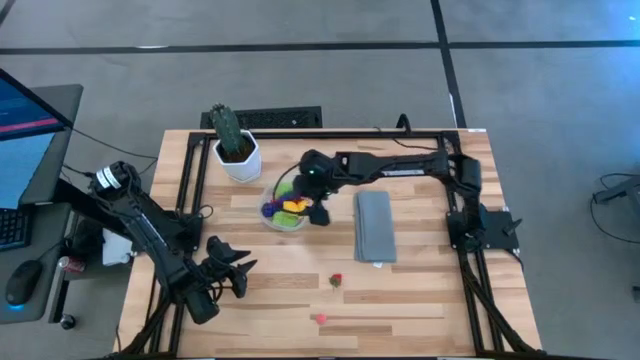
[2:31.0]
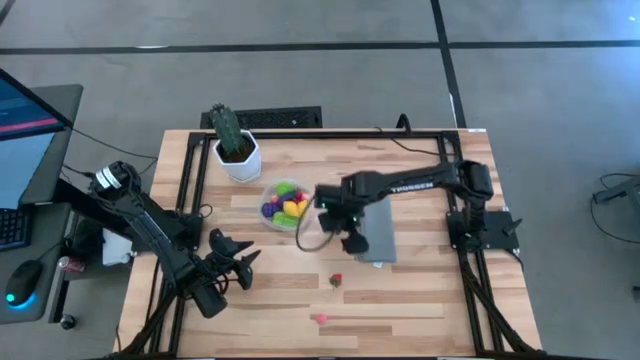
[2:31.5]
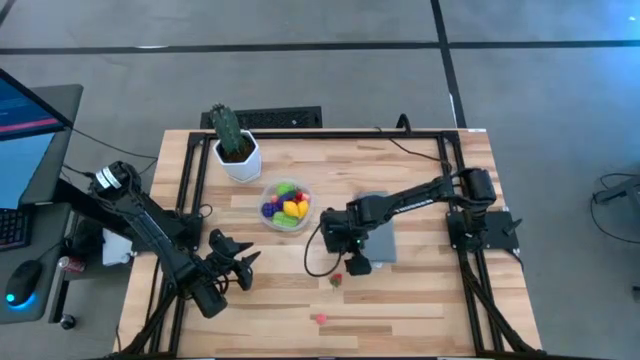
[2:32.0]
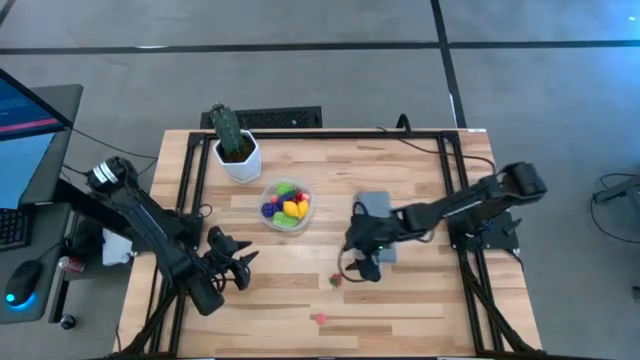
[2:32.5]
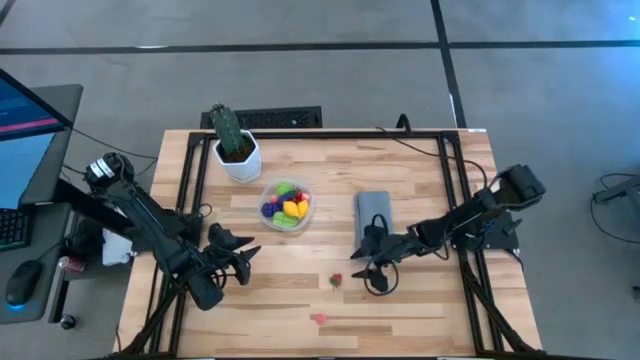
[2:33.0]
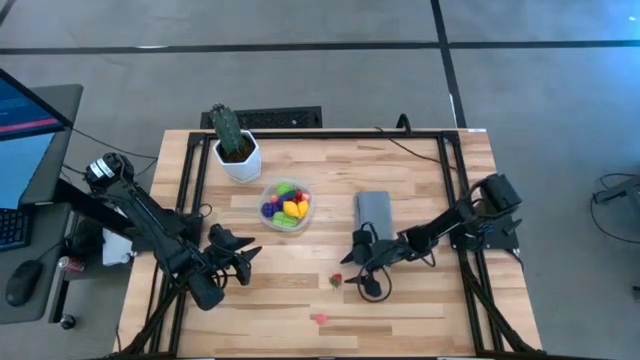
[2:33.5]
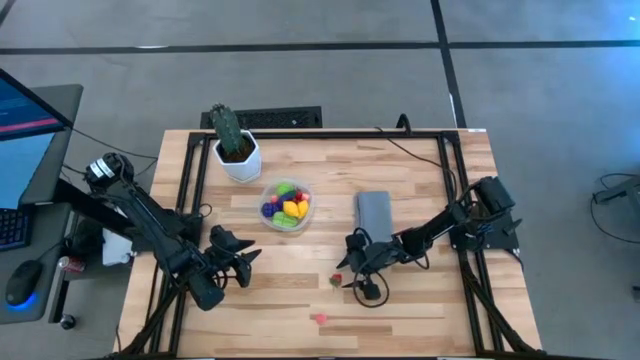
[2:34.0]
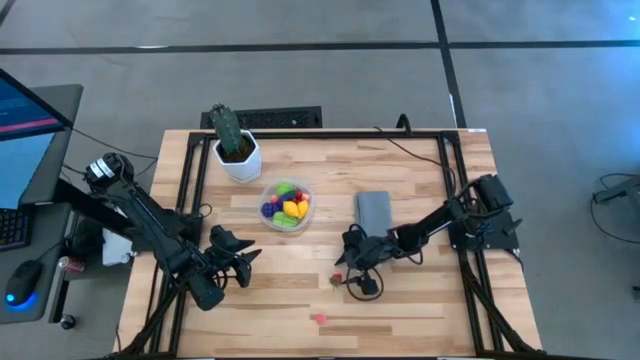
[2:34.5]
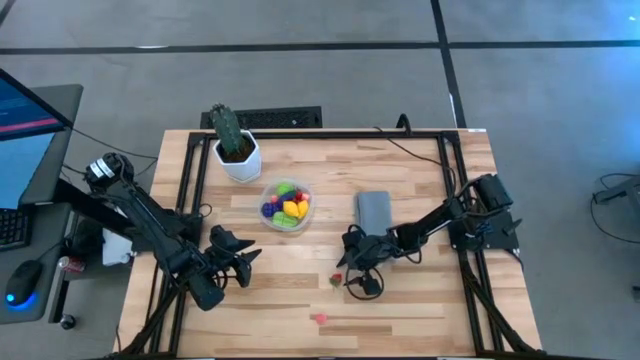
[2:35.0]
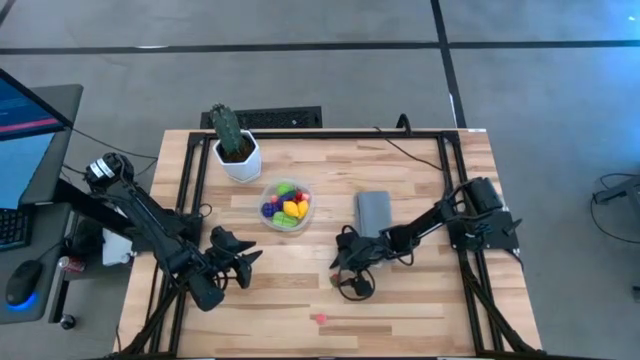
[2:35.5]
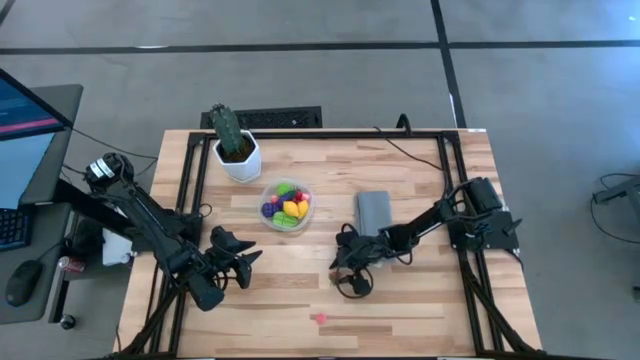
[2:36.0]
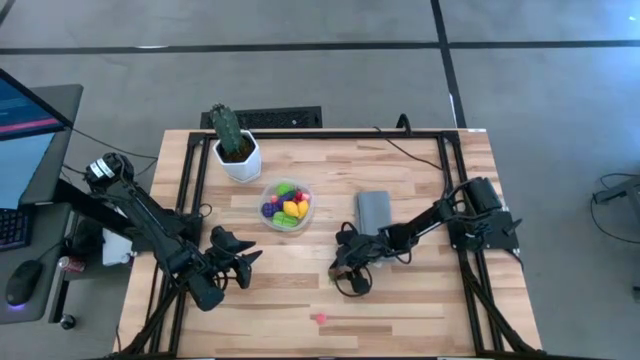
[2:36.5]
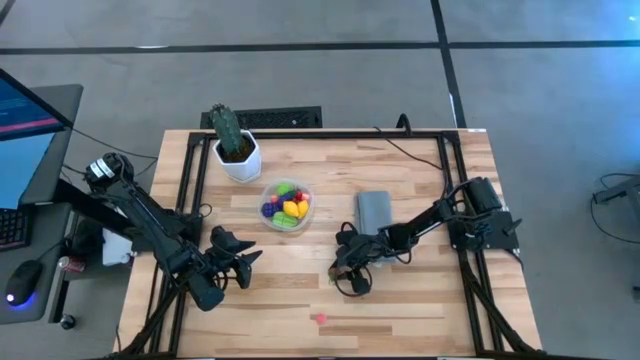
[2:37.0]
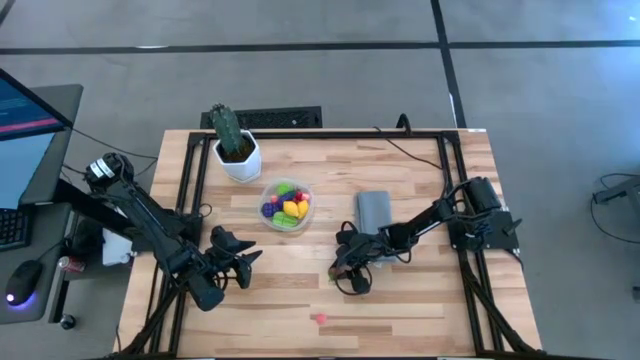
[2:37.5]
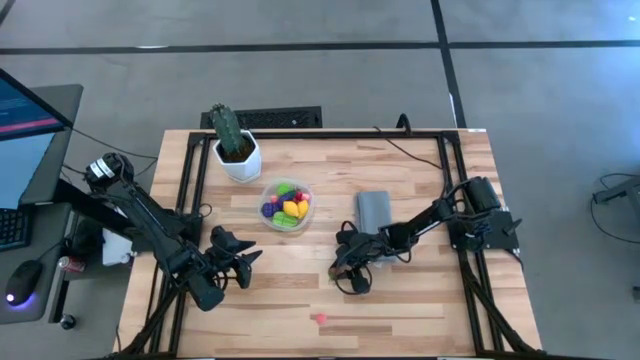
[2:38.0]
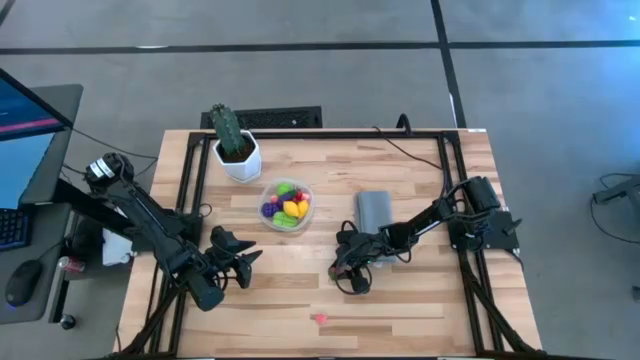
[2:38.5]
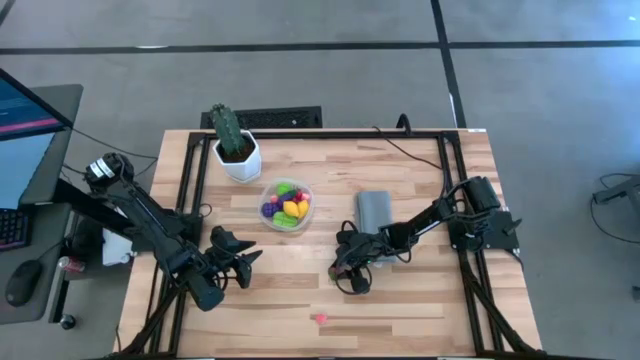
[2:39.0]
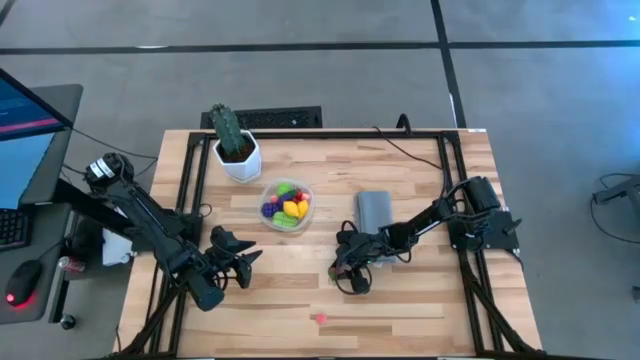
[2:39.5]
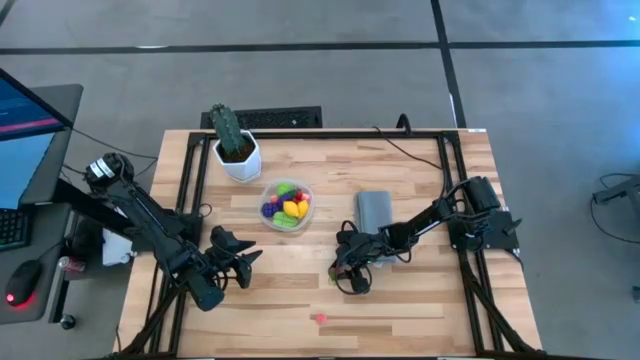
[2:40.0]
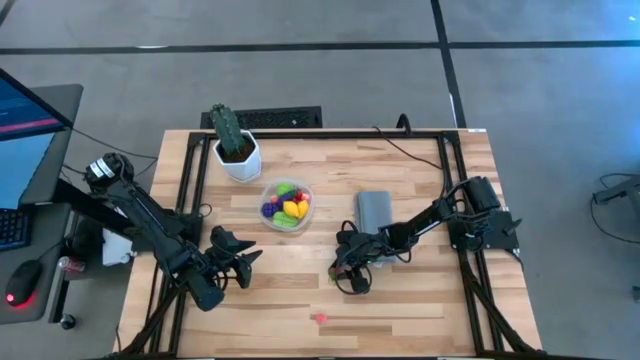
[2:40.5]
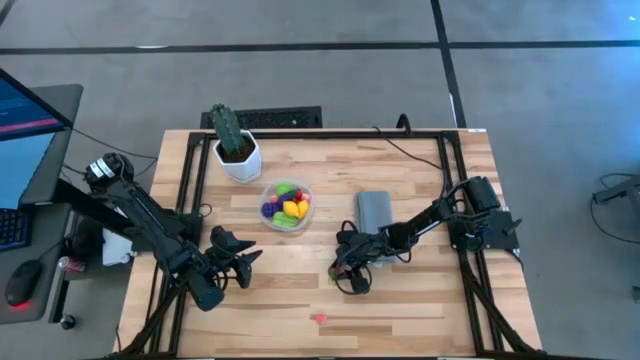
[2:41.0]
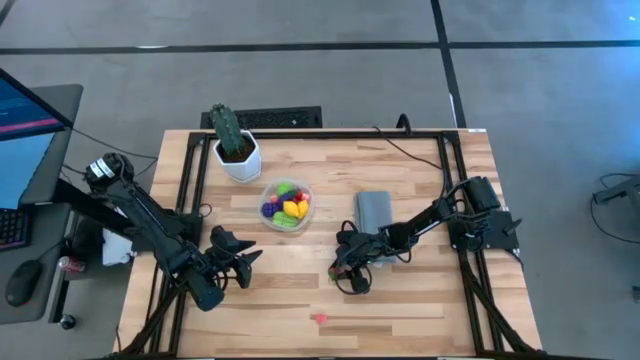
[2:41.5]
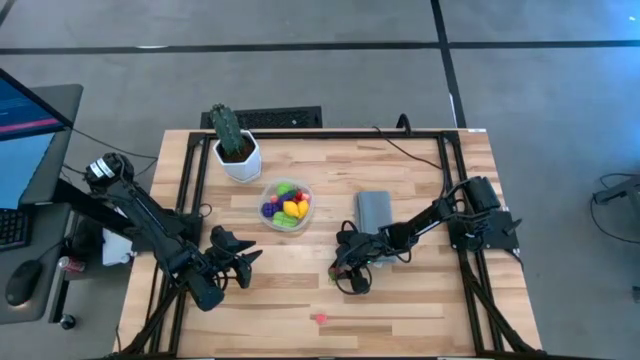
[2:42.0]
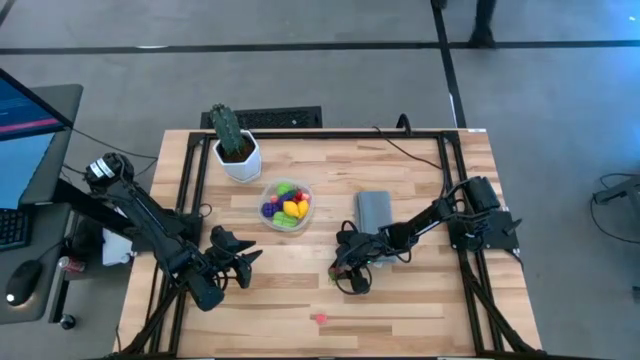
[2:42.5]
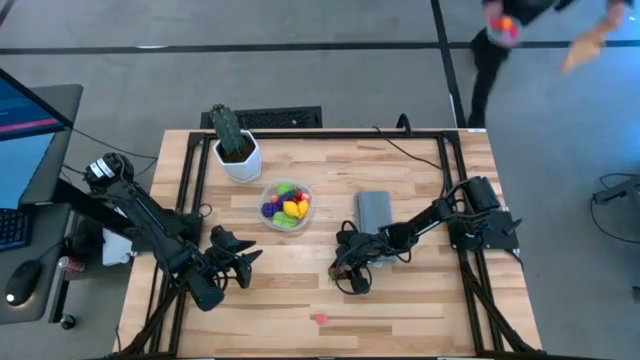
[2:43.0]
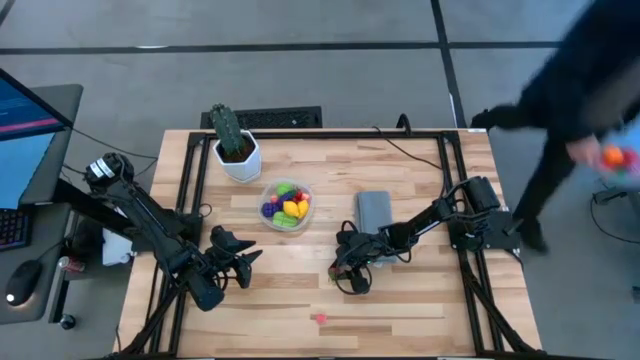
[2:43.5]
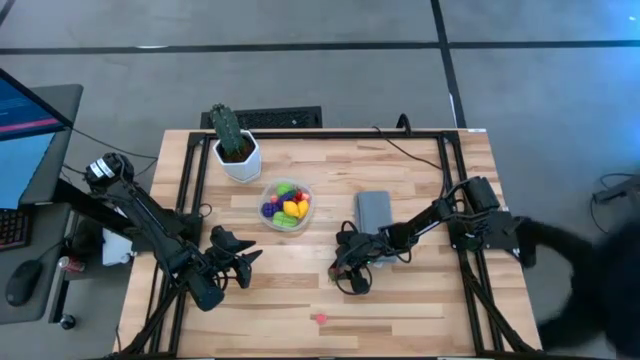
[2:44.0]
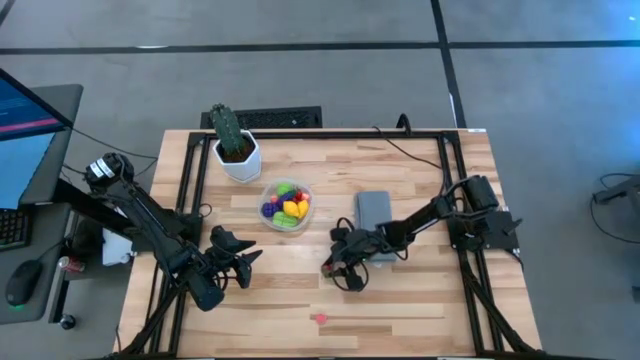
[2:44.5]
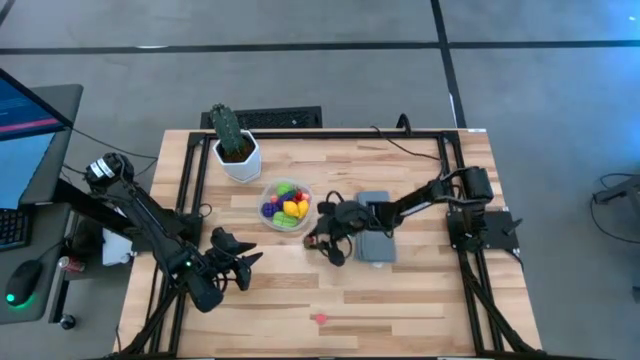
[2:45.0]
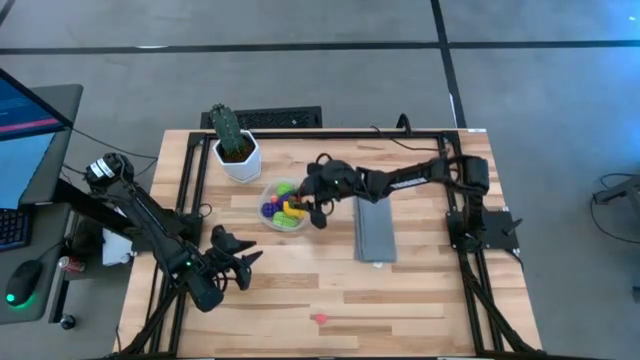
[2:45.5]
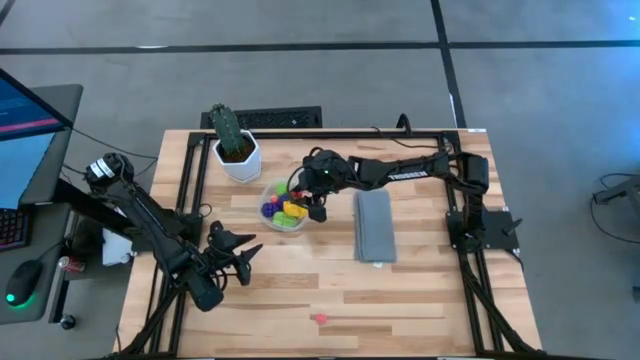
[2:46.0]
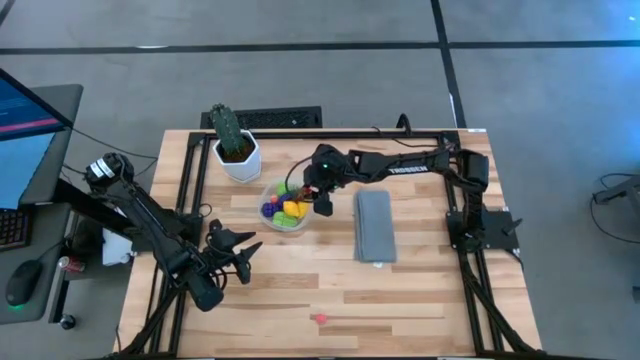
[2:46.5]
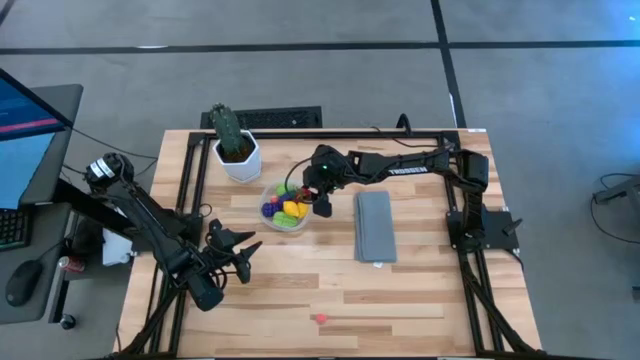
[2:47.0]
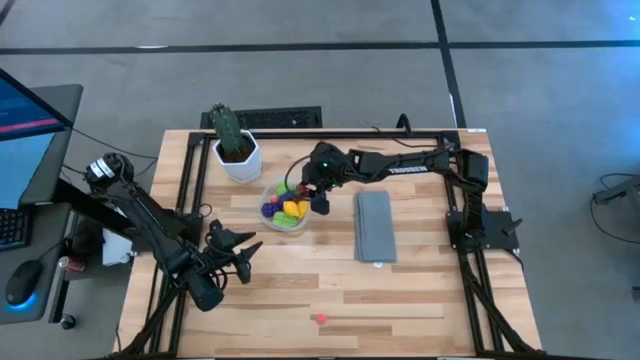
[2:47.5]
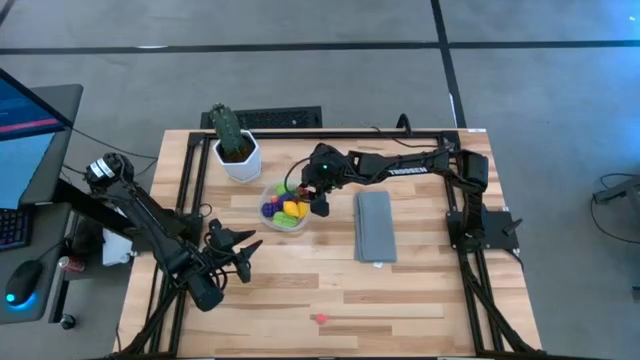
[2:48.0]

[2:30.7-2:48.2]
Task: Pick and placing Produce into tupperware
Put the red strawberry into the transparent container

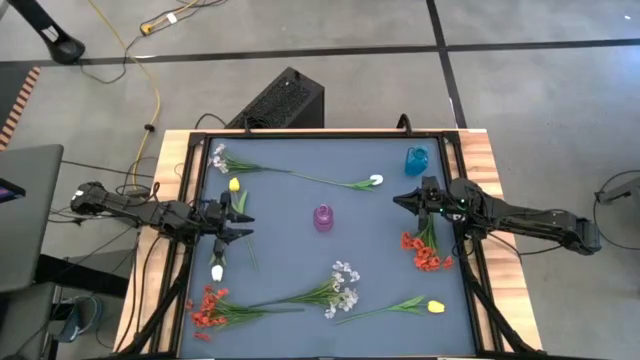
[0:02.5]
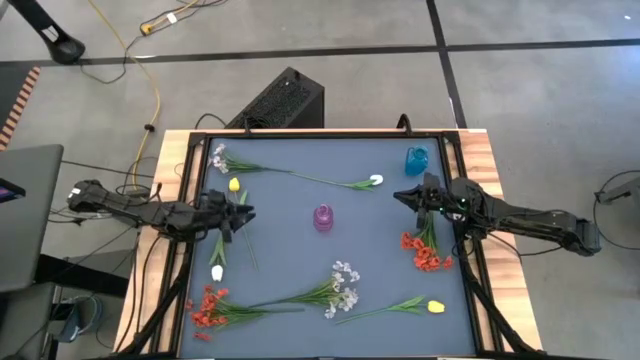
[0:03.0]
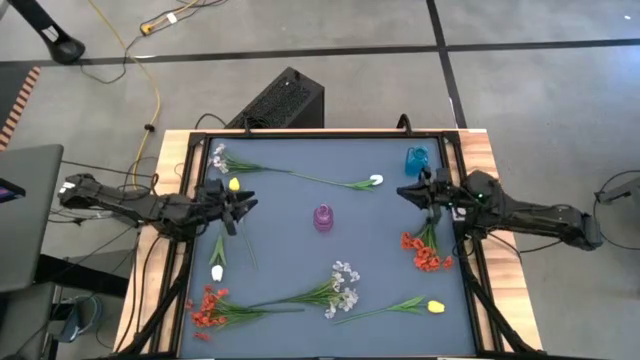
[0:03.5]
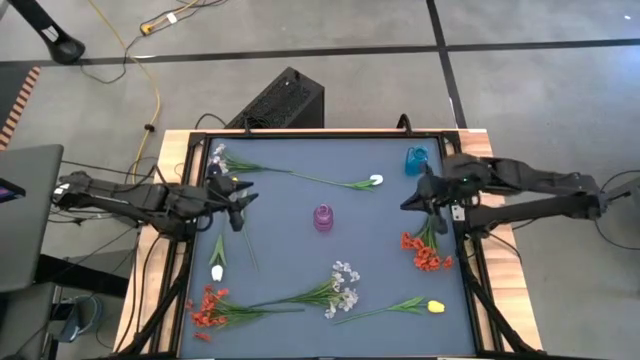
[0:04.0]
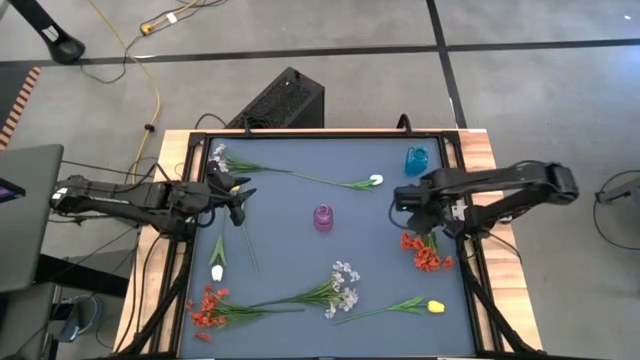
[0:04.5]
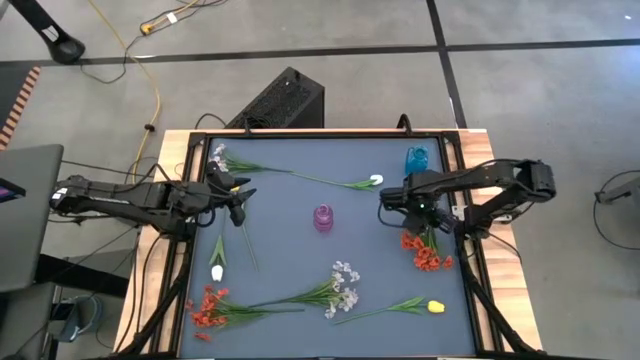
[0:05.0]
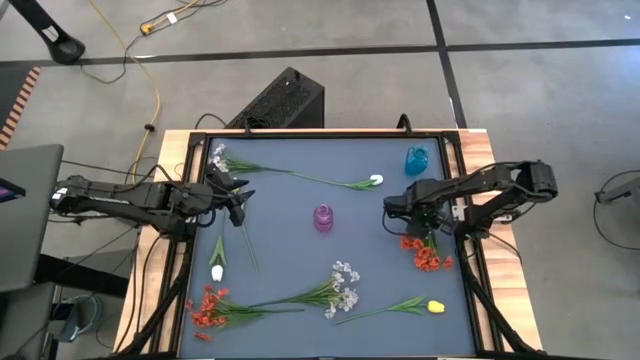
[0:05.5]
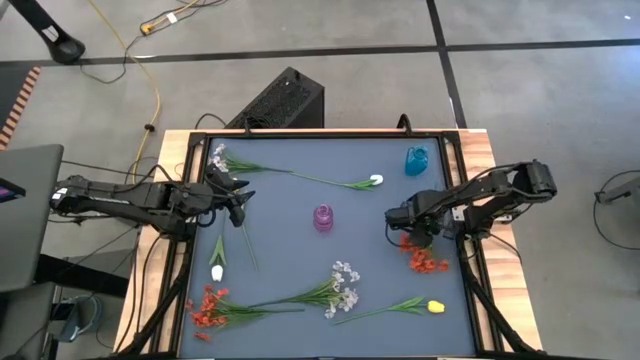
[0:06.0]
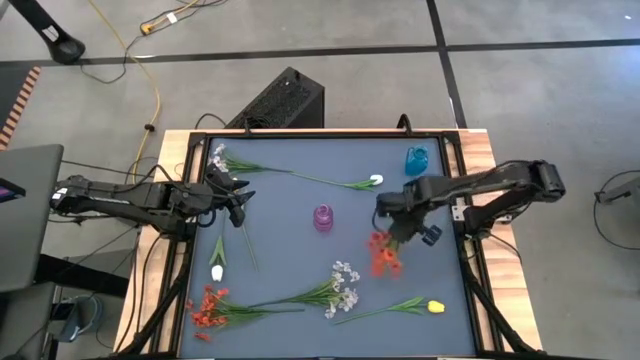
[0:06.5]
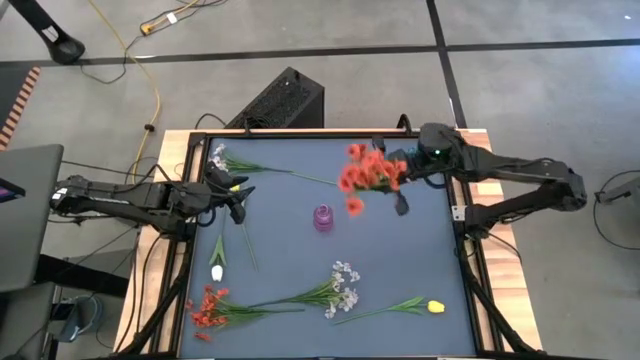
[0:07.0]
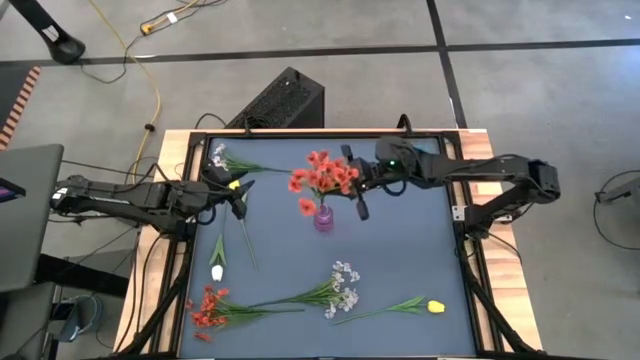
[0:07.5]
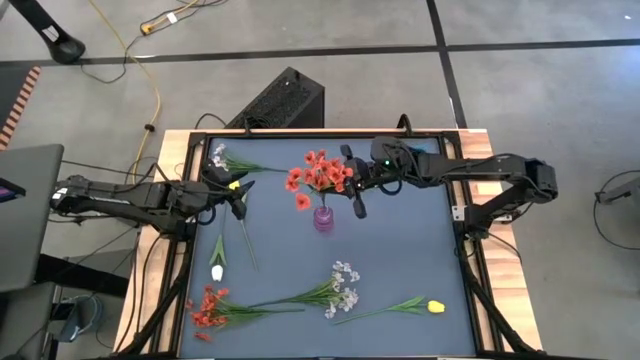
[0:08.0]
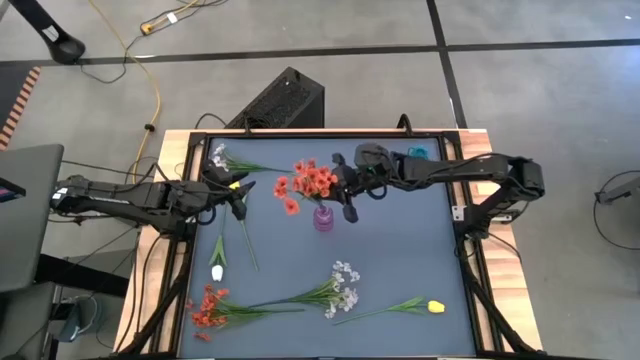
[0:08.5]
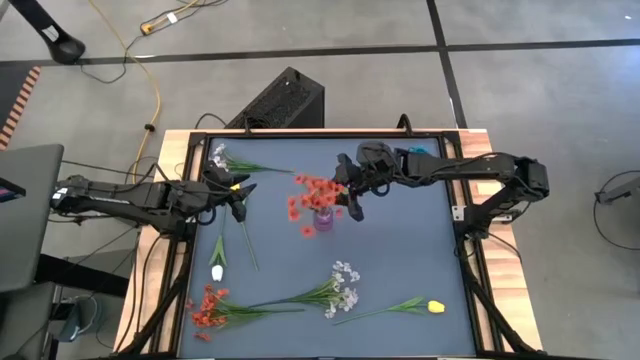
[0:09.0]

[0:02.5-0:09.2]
Task: Sort flowers into vase by color
Put the top orange flower into the pink vase
